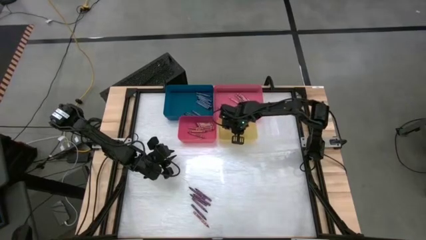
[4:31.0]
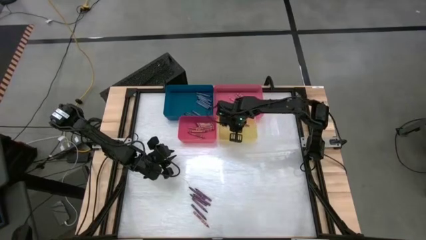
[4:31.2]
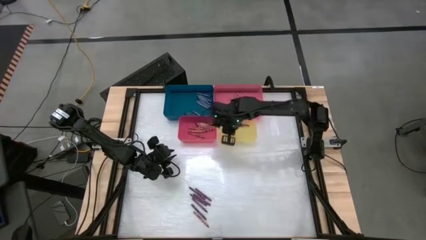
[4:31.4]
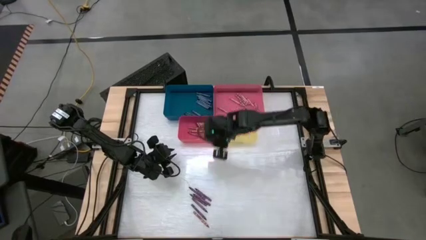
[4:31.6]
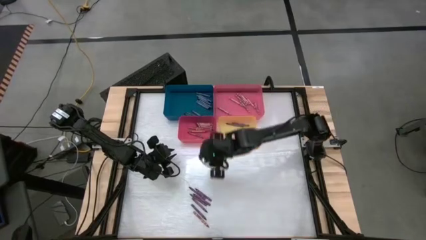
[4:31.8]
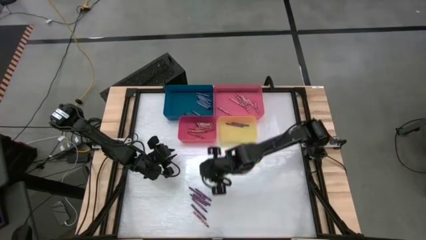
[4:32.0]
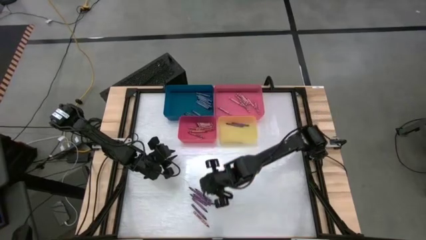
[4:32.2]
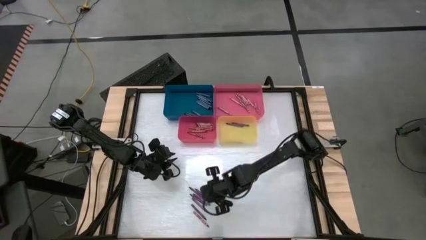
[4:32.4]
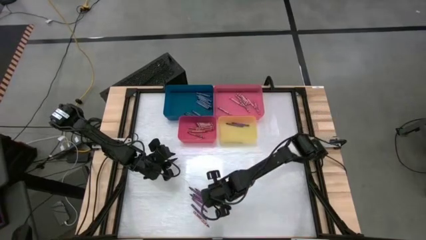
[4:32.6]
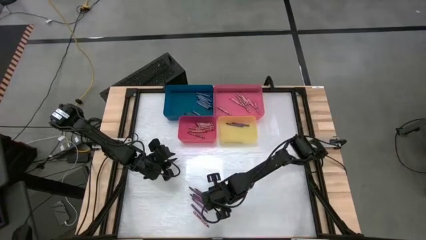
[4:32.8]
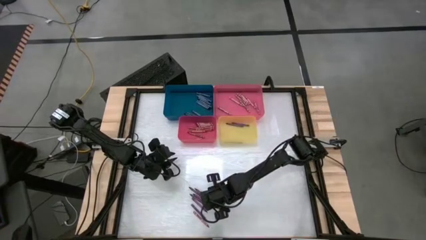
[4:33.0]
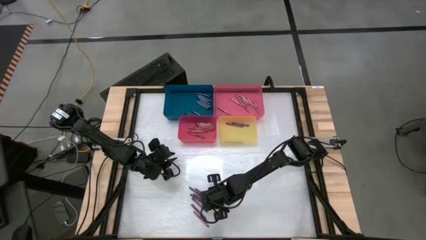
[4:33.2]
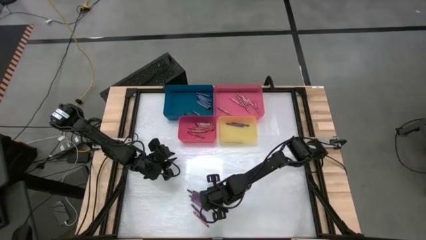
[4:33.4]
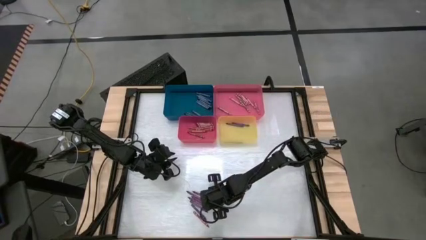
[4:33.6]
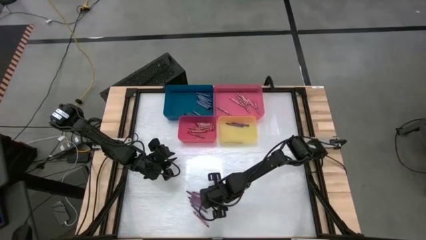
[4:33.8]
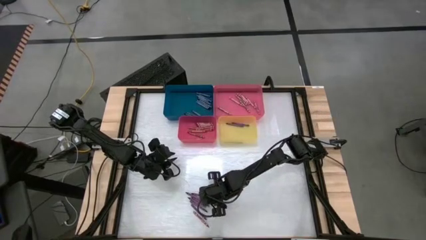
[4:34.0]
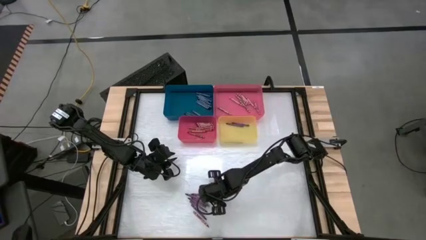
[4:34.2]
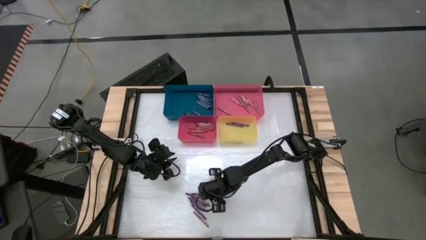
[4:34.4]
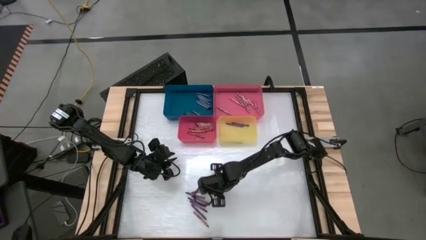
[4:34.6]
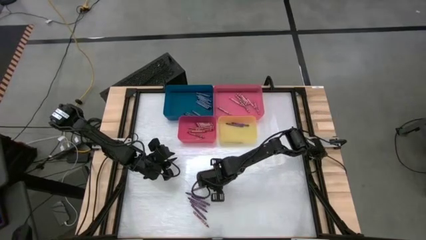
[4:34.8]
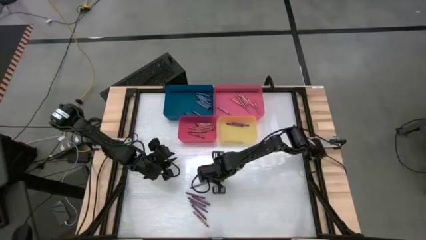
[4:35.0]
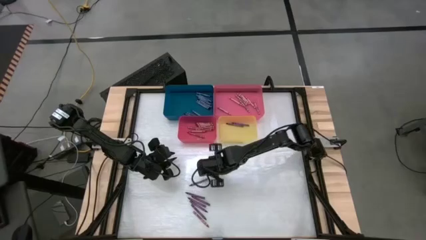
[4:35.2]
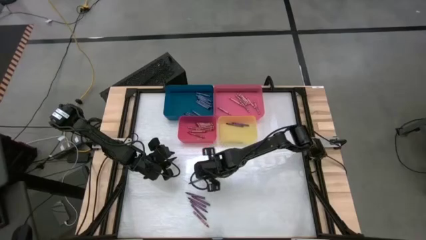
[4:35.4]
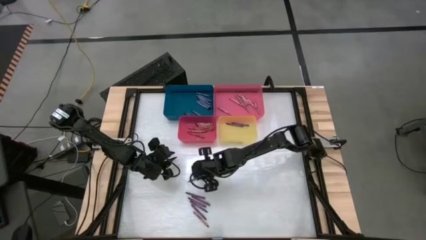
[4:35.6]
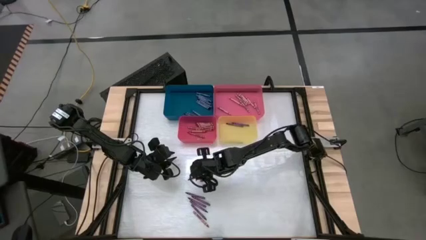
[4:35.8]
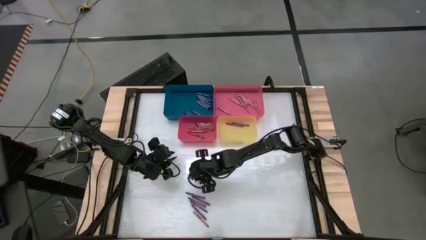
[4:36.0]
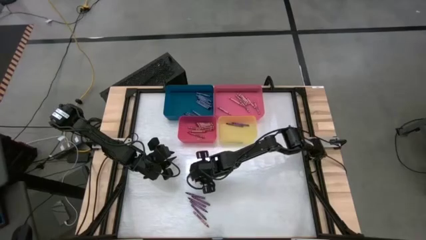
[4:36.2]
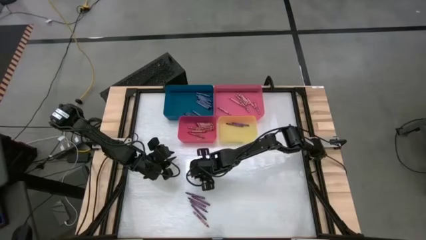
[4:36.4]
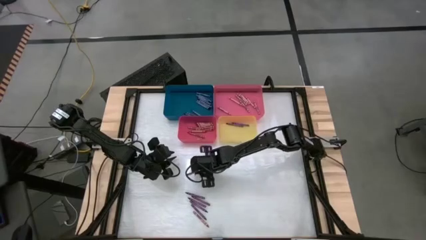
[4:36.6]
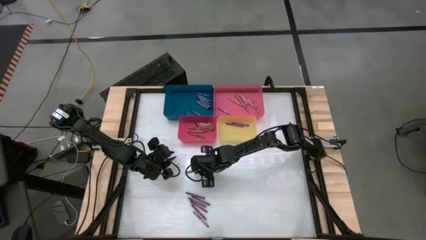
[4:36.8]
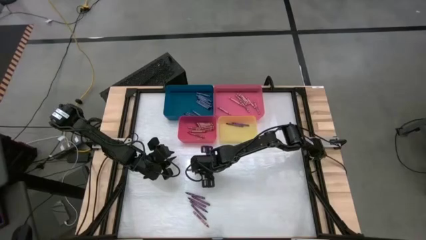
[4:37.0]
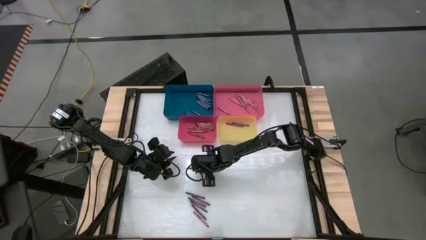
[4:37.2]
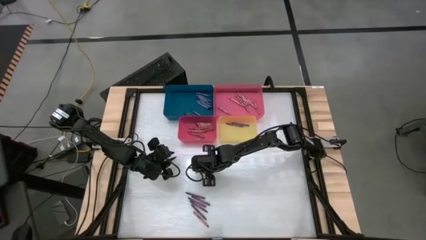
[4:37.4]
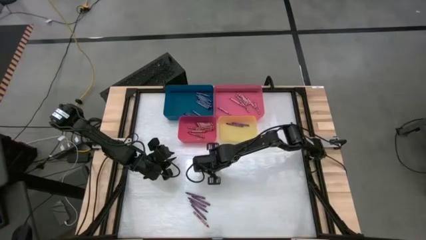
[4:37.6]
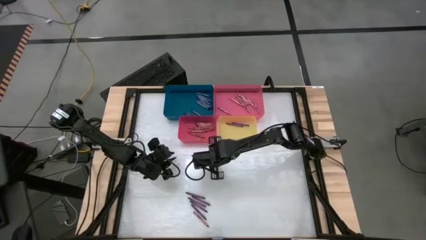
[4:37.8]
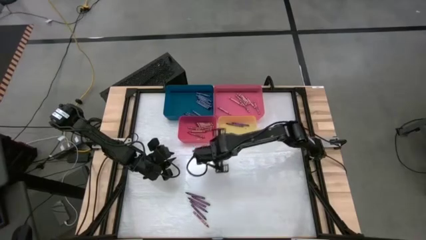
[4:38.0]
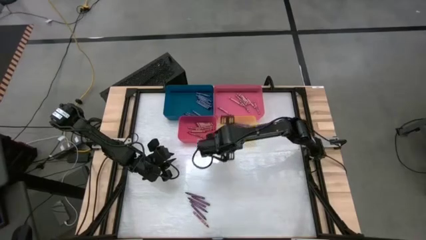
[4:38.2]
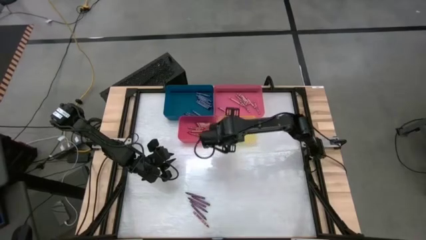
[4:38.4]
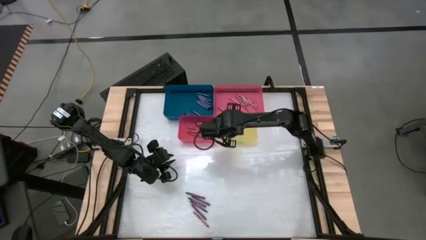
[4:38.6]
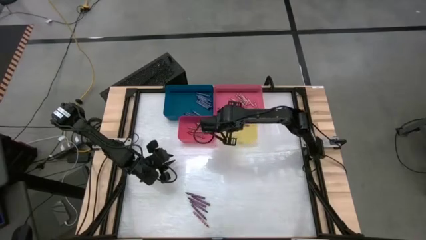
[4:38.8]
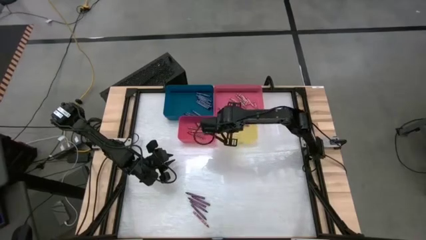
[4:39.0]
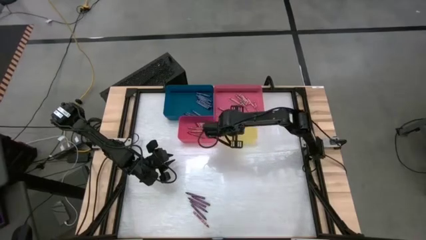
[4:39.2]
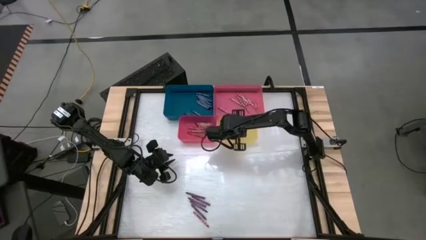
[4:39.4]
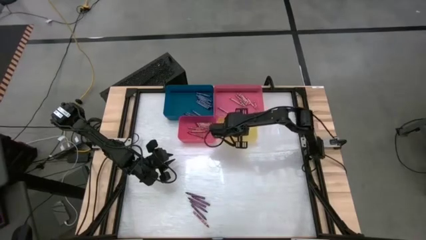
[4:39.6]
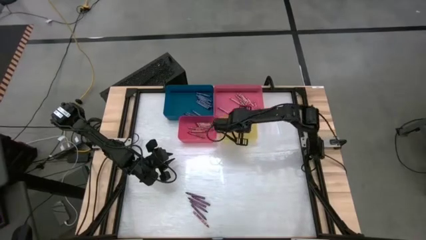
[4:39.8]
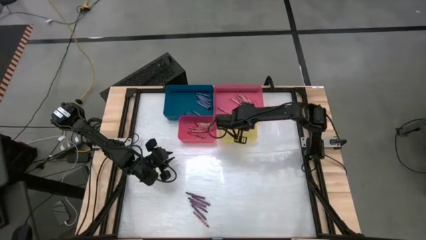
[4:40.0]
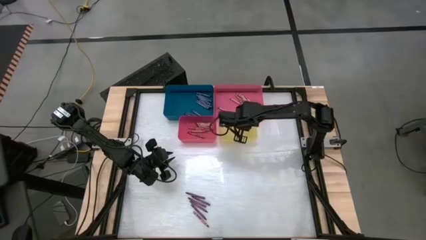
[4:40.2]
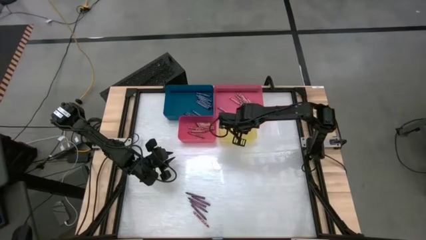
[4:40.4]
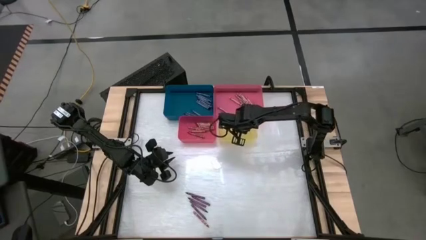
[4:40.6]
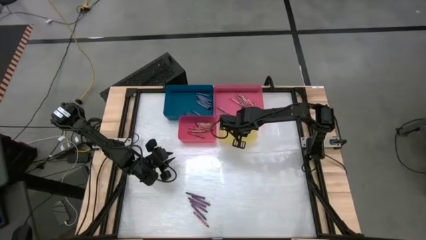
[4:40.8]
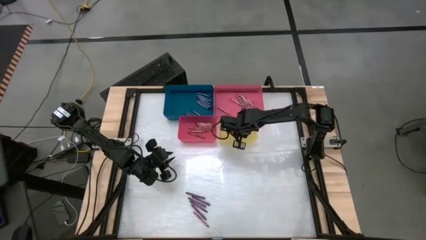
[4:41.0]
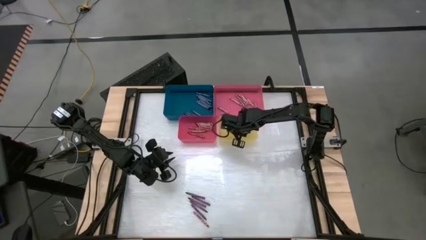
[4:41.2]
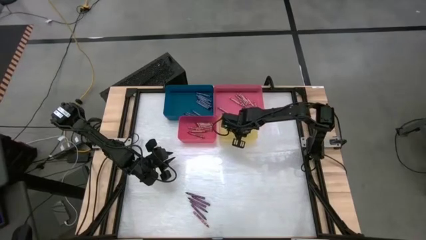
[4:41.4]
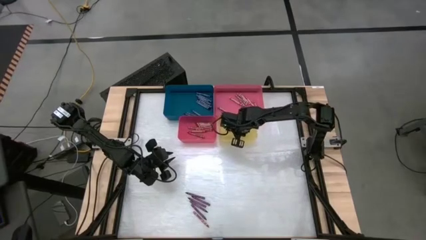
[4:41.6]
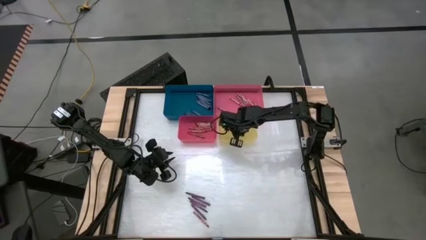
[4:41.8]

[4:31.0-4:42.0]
Task: Sort crayons
Put the violet crayon into the yellow bin

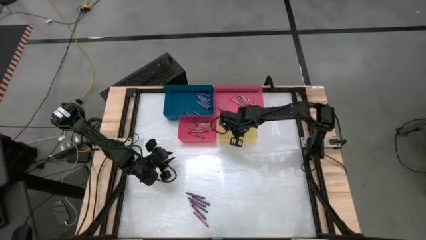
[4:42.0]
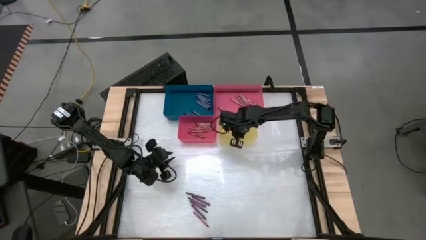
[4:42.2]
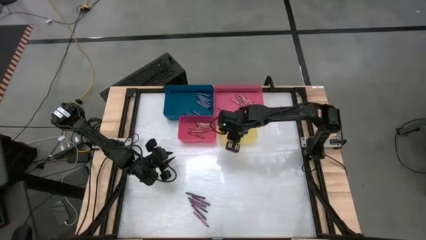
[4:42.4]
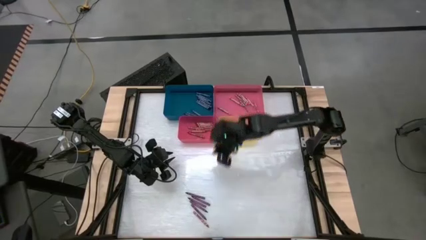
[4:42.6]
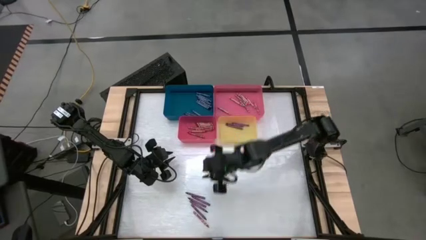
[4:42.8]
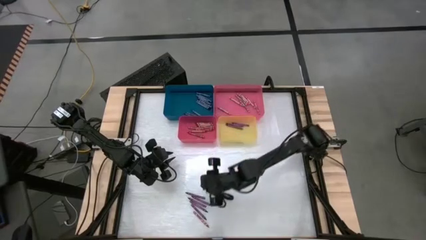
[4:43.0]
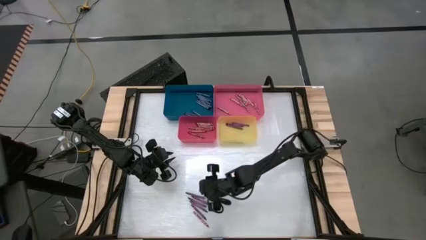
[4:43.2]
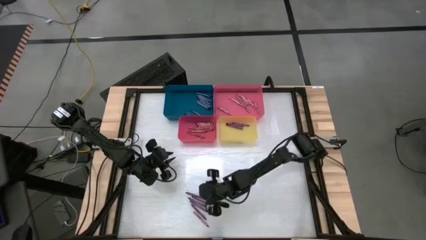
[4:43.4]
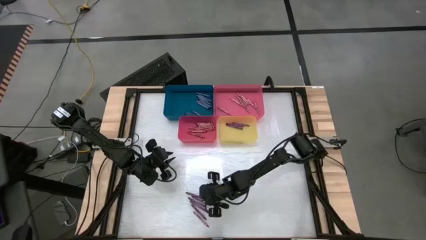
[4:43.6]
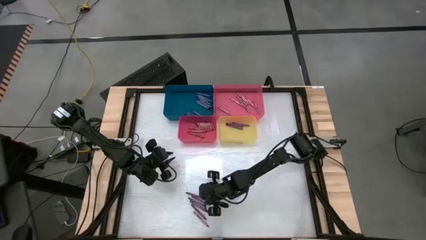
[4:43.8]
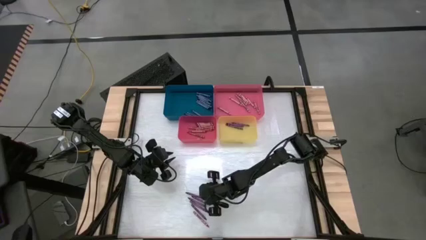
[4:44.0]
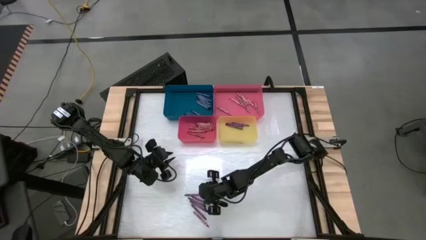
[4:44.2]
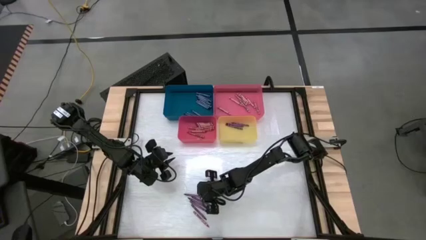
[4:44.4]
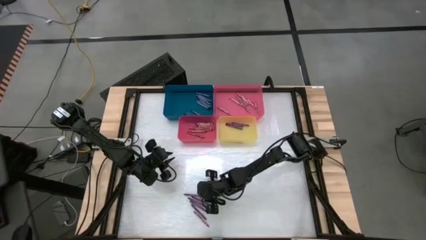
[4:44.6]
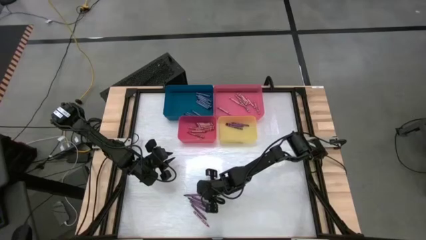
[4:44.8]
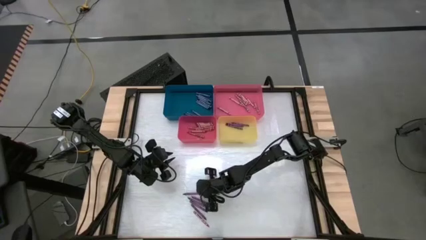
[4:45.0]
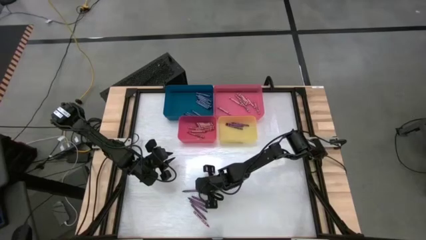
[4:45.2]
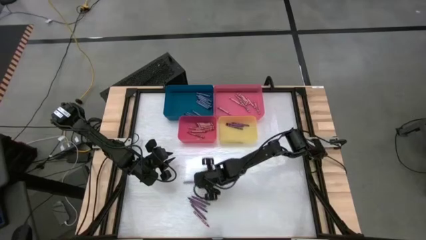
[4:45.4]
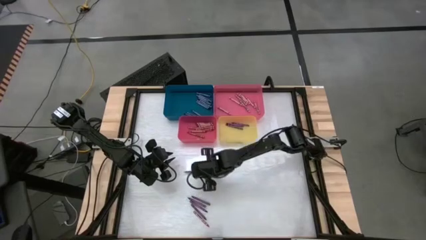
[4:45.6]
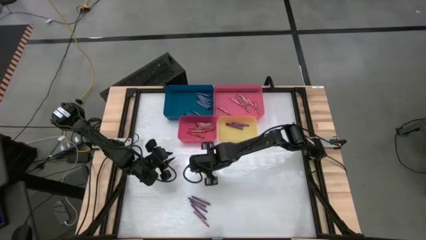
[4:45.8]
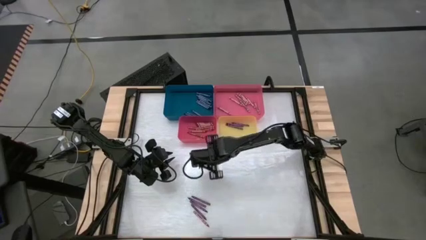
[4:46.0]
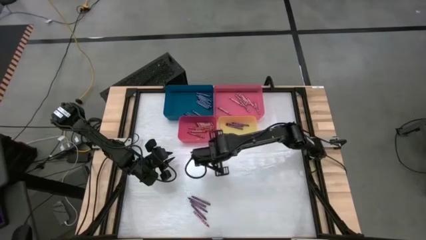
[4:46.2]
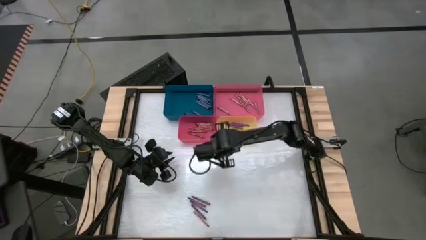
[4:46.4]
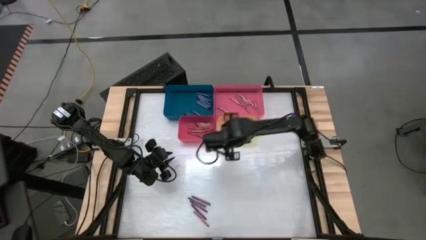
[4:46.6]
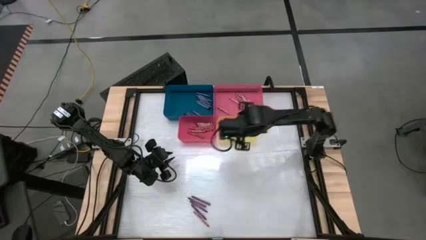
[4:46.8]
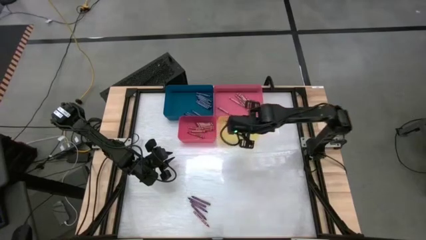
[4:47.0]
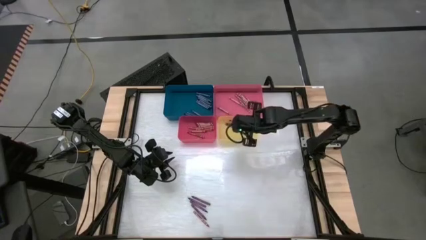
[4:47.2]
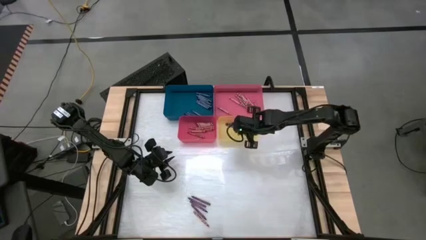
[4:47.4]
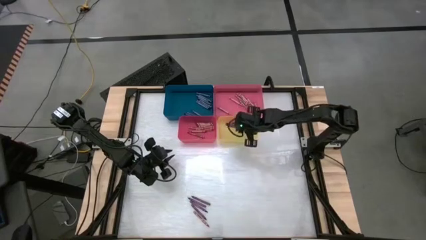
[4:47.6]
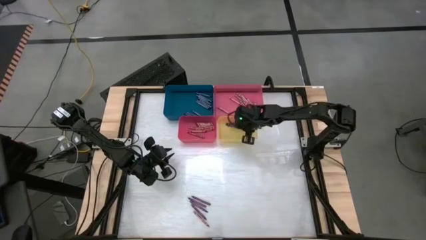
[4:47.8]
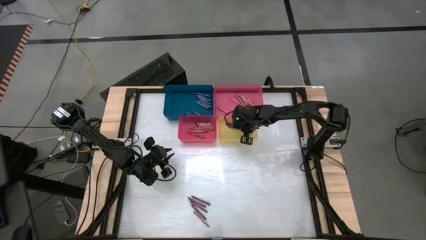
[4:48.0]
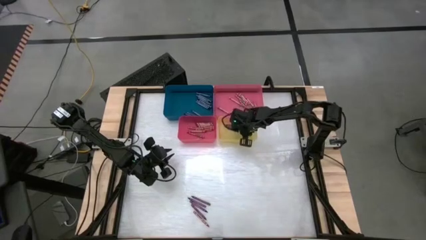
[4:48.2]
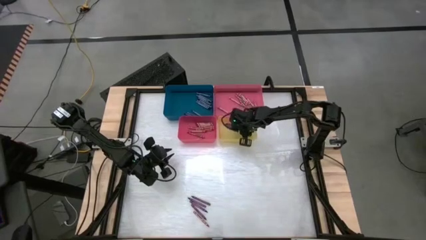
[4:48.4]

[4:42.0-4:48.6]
Put the violet crayon into the yellow bin
